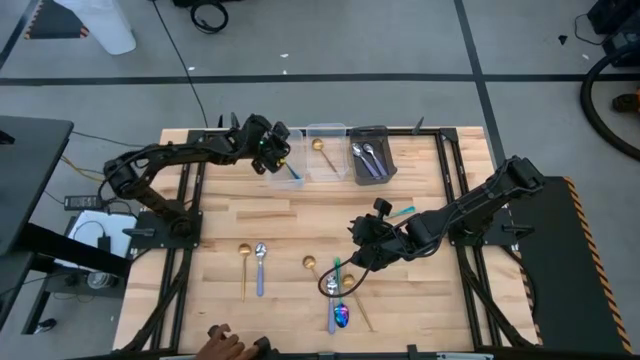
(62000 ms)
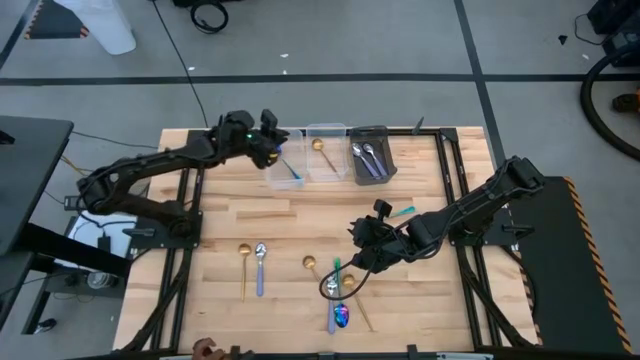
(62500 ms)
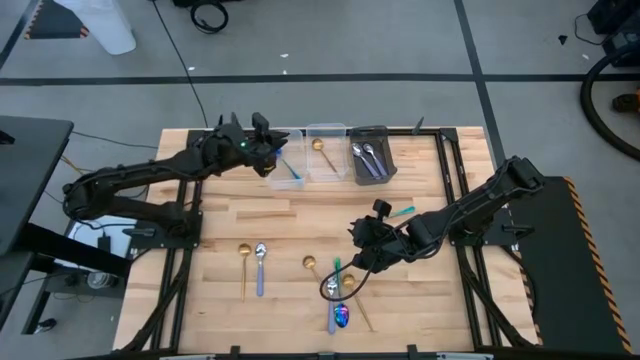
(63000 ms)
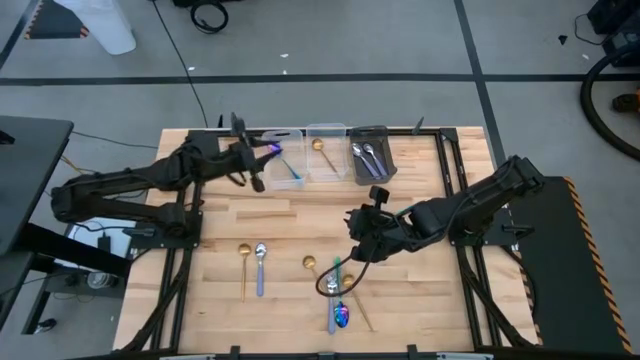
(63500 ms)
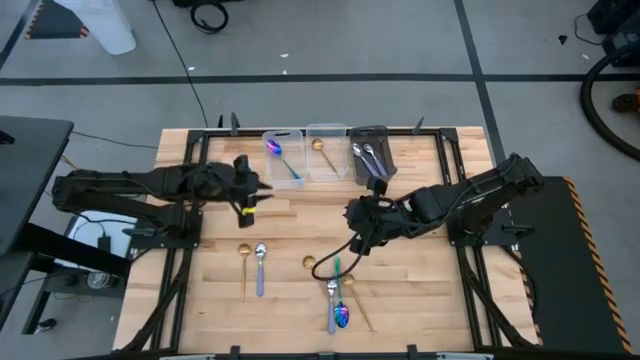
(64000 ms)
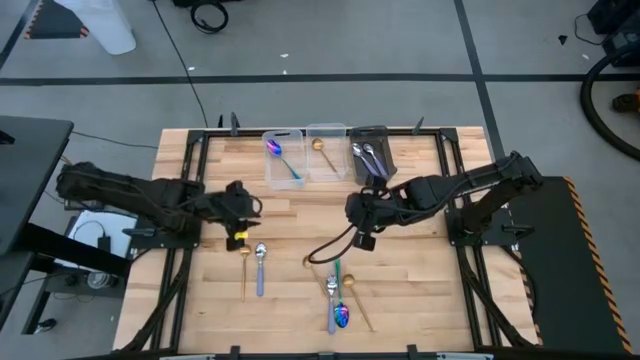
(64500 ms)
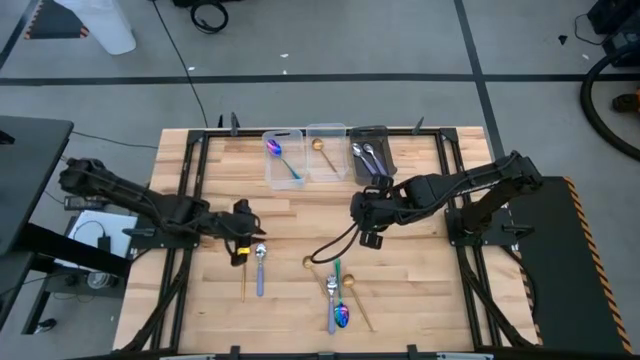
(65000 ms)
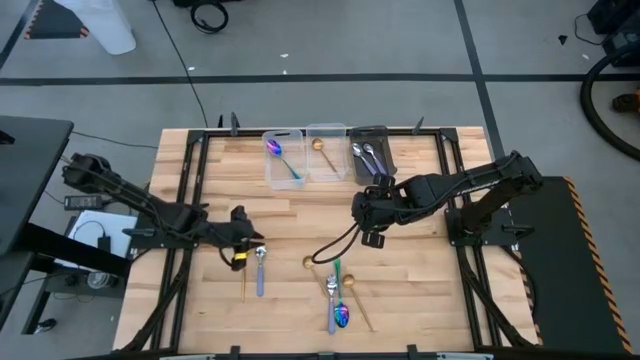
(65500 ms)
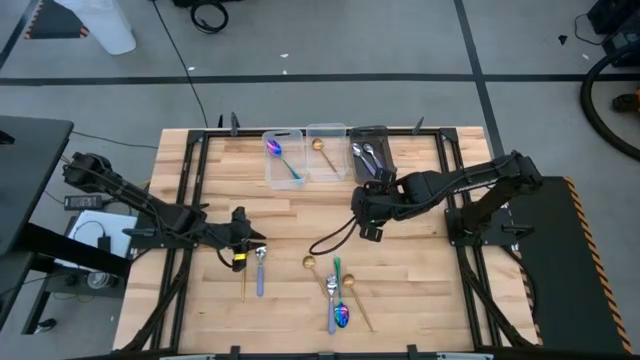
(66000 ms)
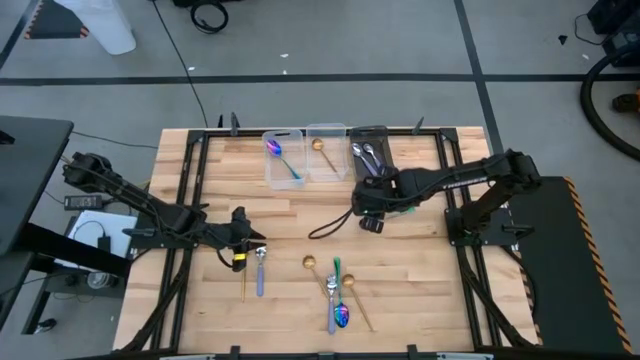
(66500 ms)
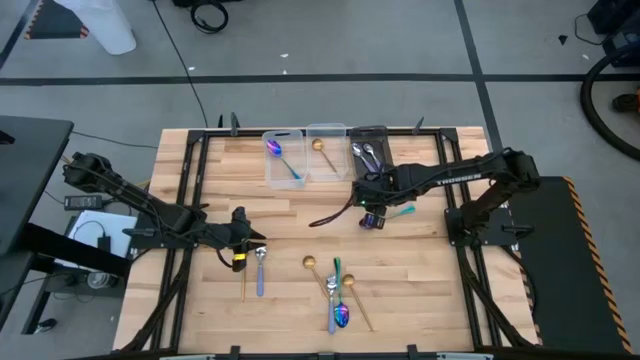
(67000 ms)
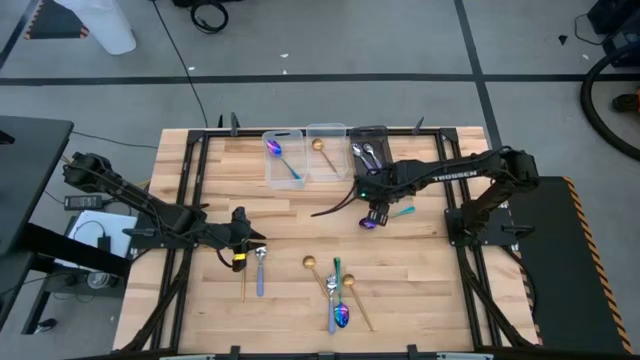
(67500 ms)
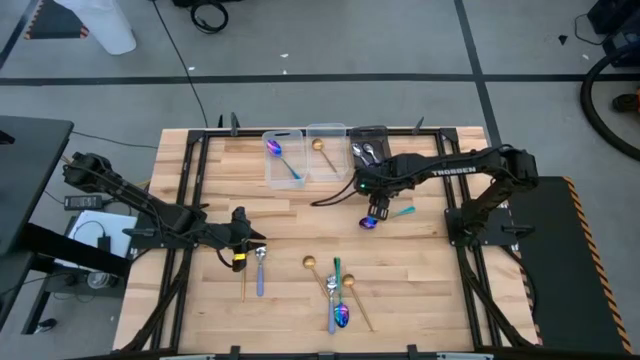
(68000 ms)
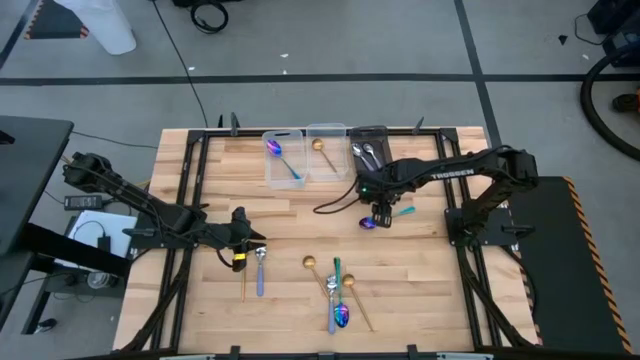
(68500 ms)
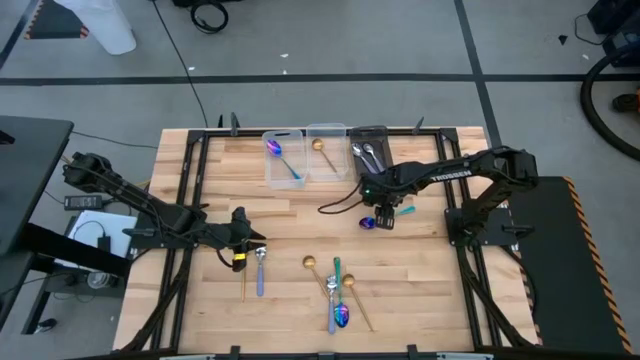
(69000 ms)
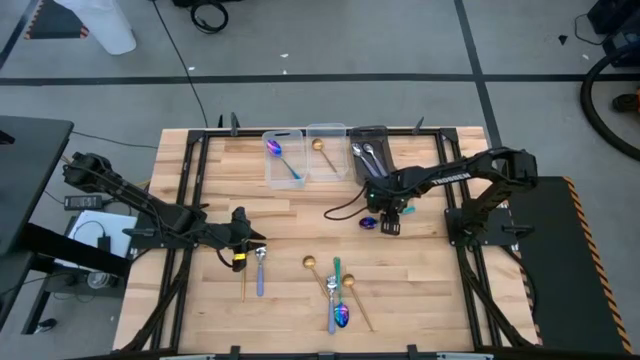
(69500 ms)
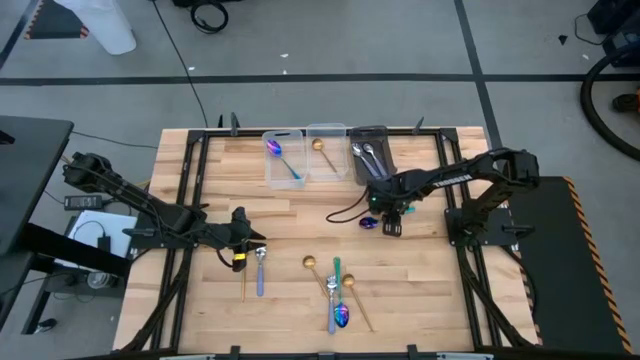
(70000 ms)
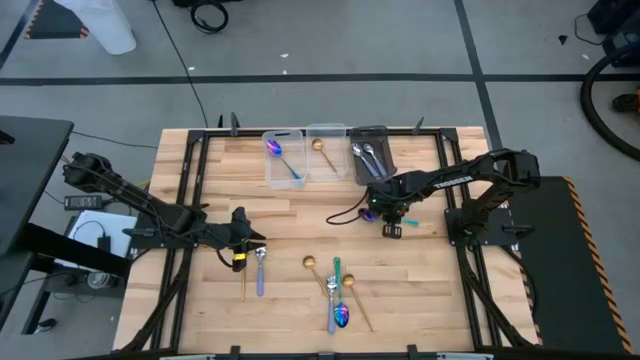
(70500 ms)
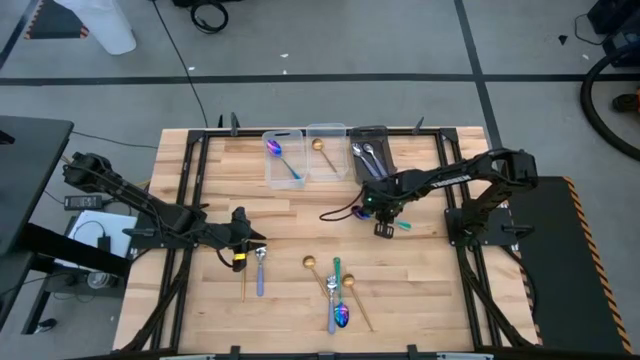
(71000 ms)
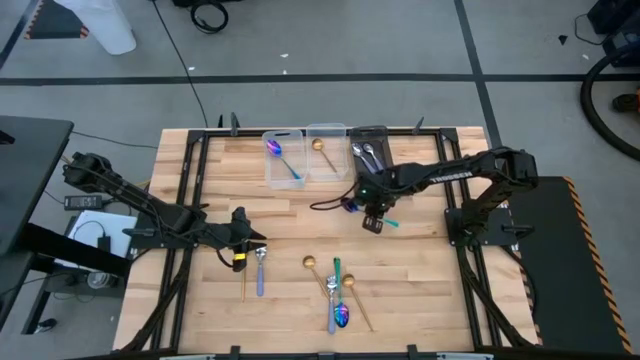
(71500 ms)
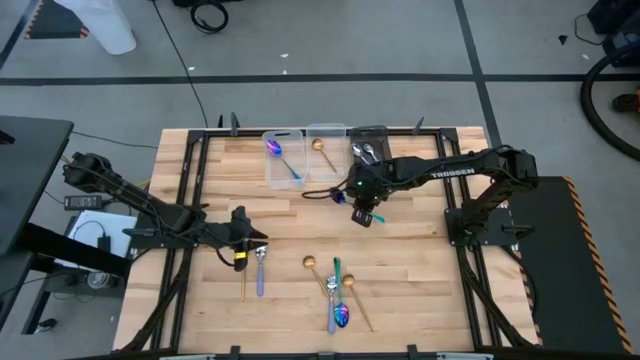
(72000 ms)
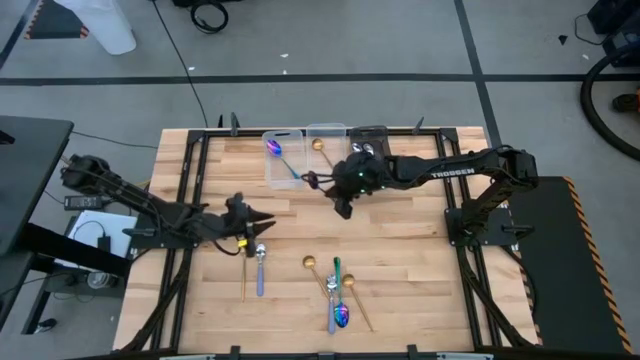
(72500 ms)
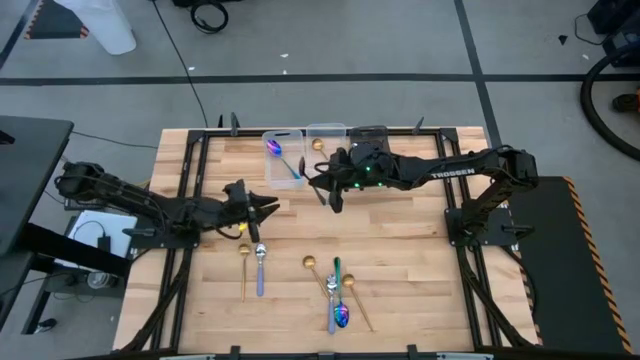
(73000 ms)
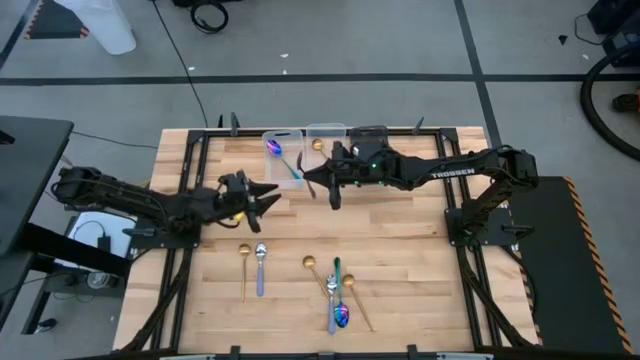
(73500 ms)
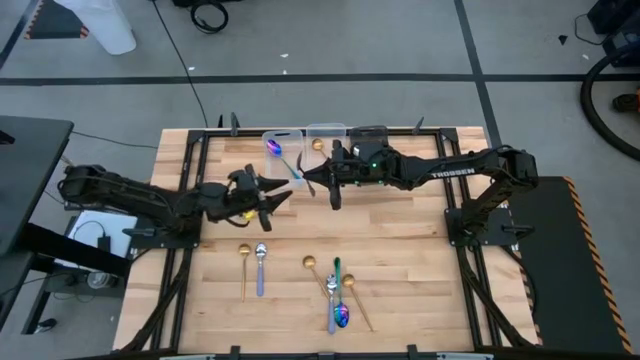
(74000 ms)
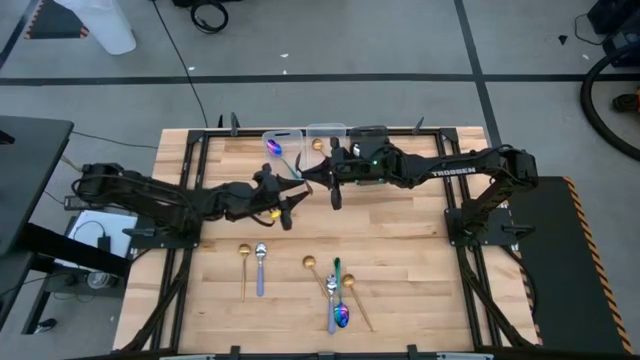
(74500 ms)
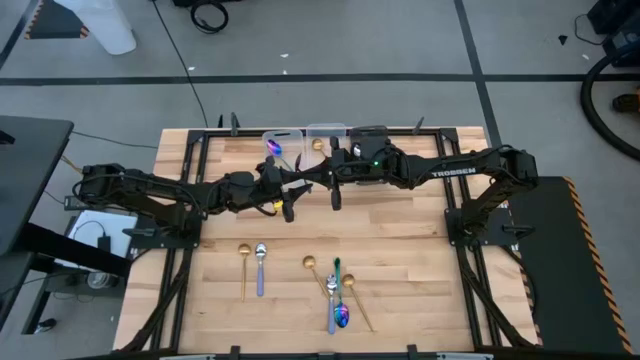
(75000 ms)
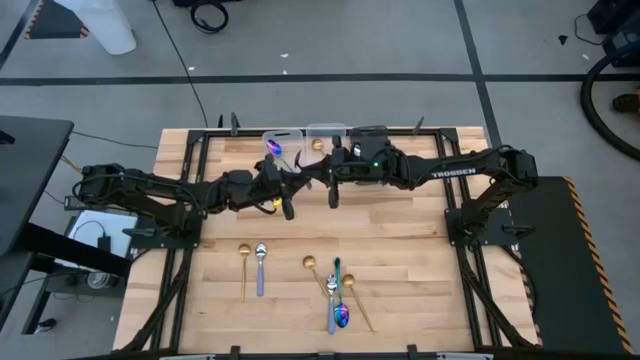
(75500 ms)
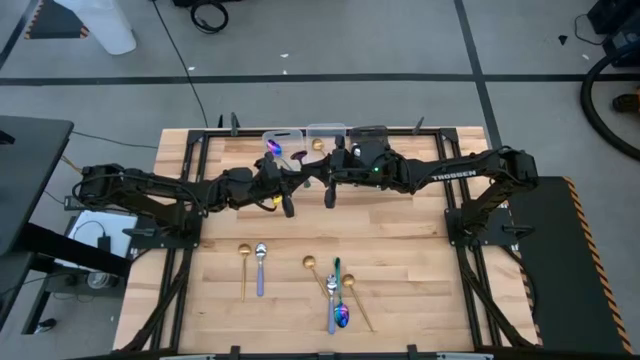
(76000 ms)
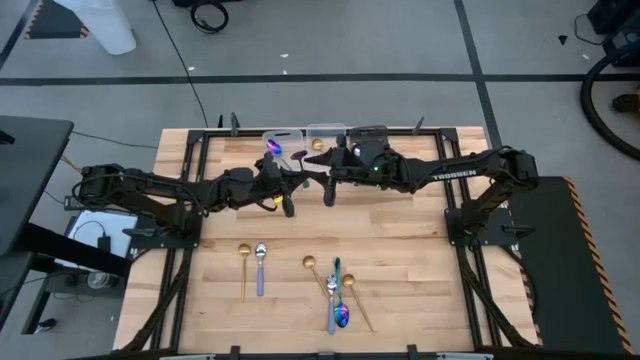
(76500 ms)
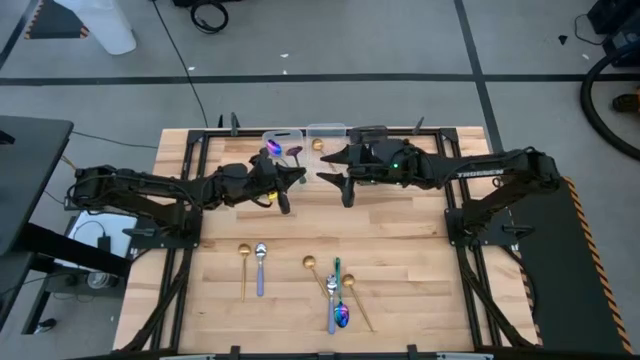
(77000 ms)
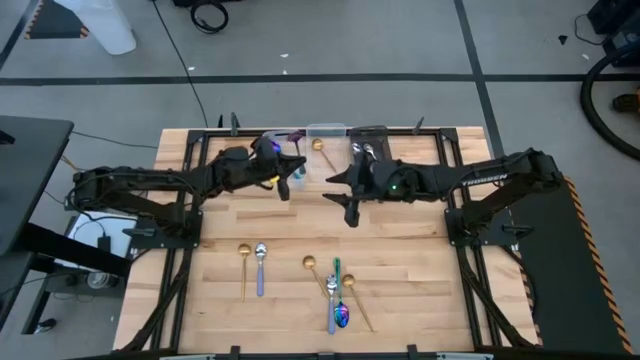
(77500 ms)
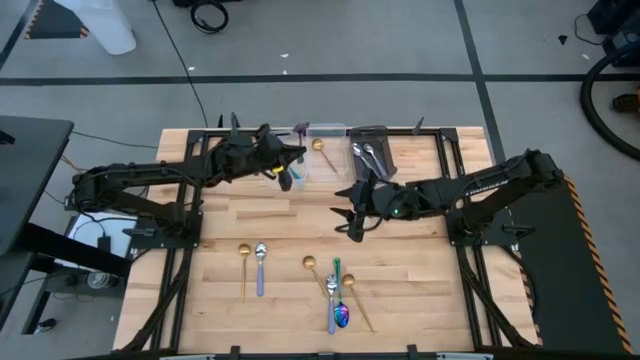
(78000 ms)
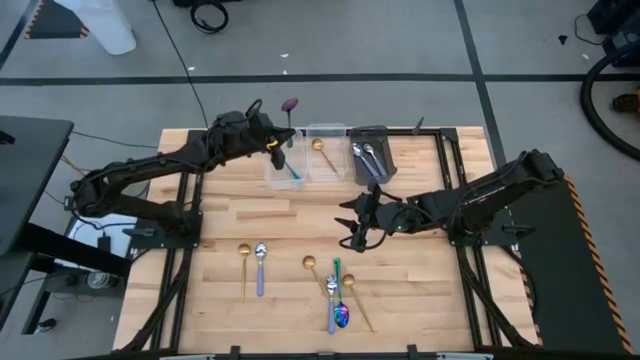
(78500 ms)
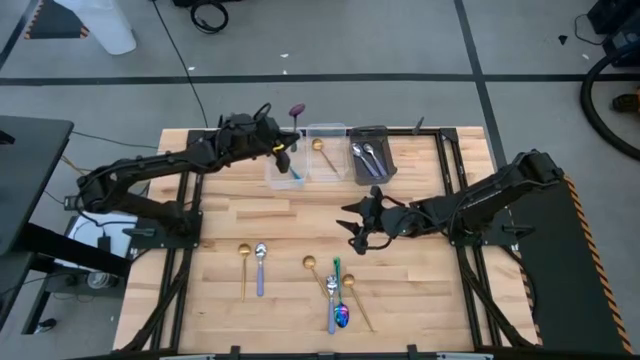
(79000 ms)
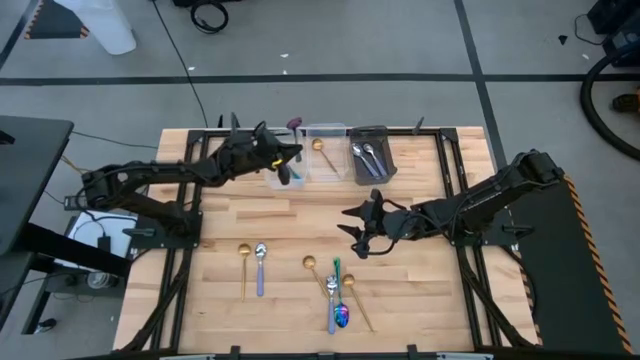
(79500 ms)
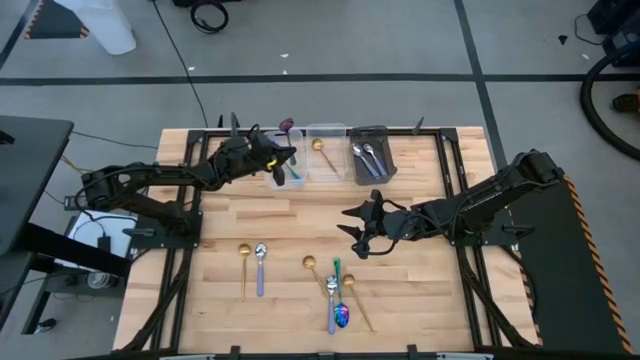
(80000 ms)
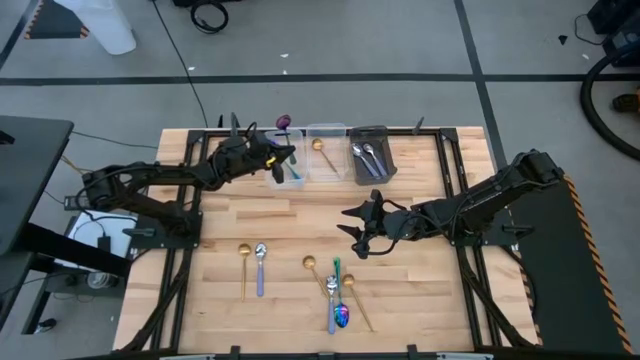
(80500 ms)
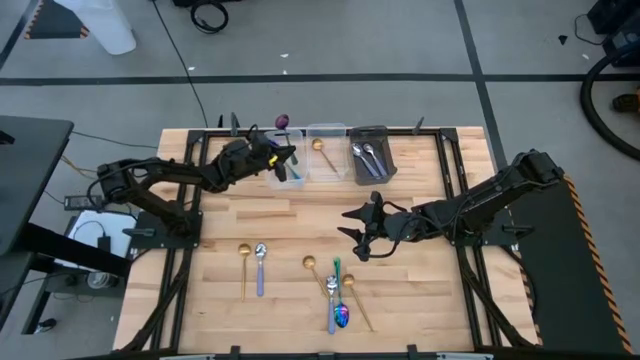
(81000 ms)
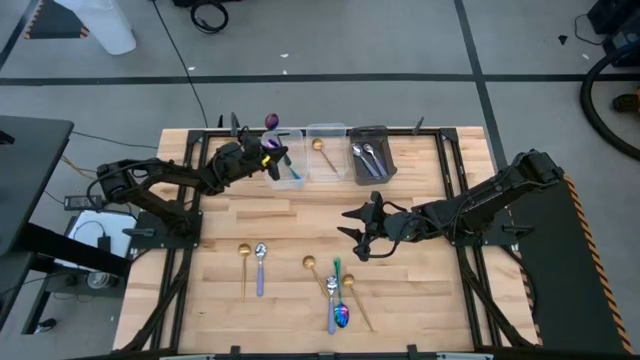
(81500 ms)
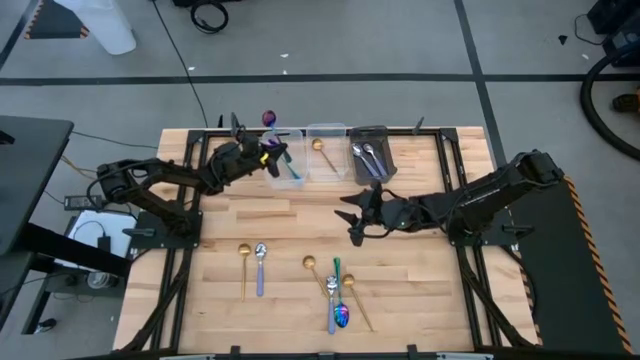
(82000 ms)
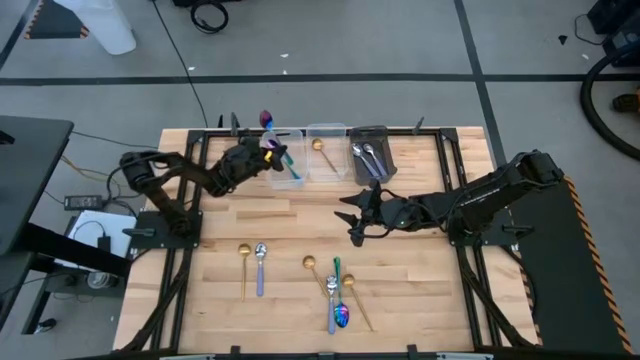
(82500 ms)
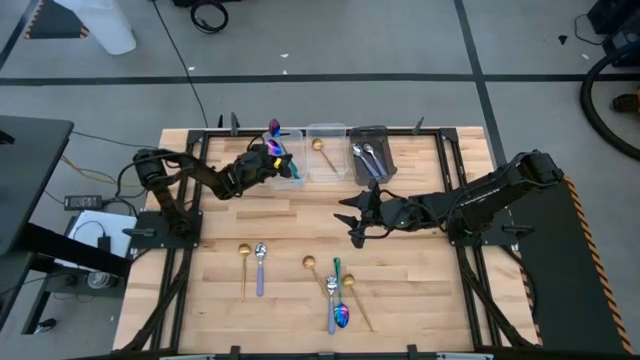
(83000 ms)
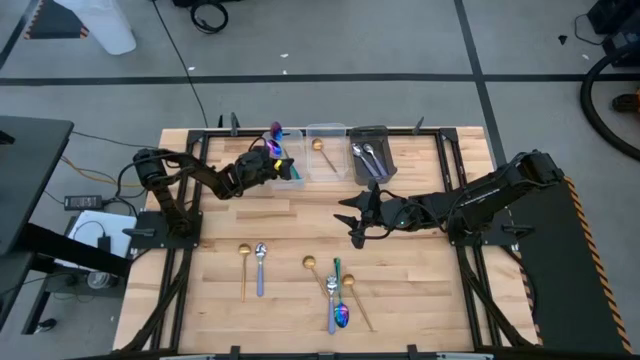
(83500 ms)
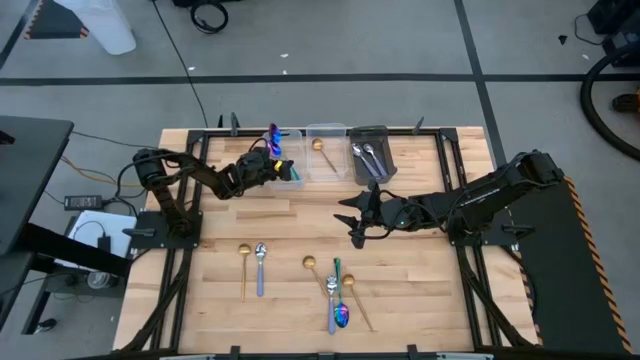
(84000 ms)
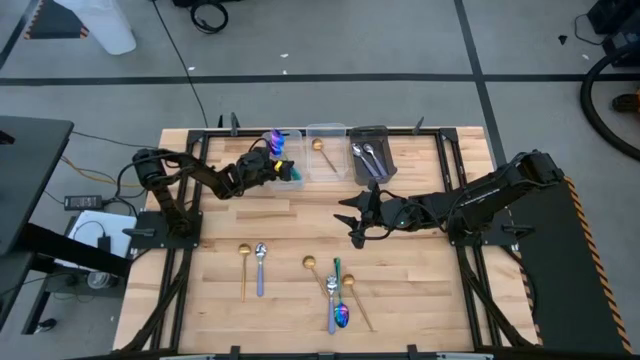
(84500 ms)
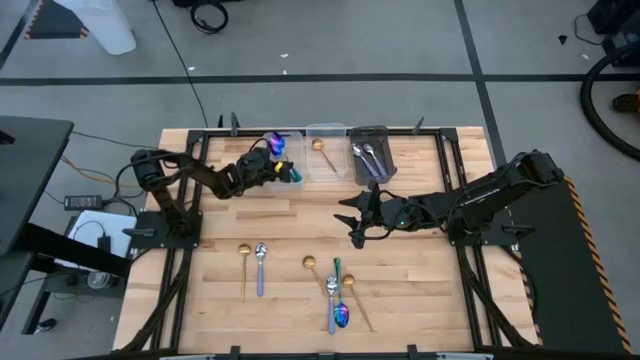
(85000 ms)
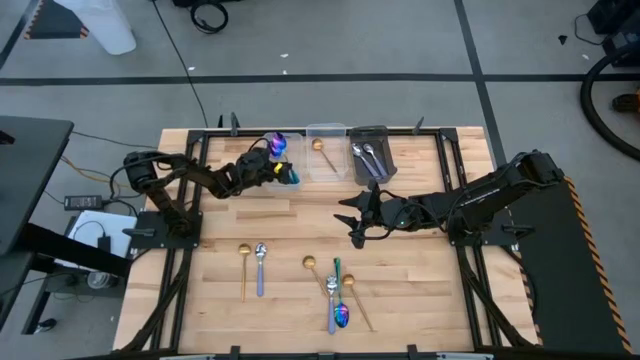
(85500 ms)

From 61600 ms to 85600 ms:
Task: Sort silverware by color (type)
Put the blue spoon into the left transparent bin
